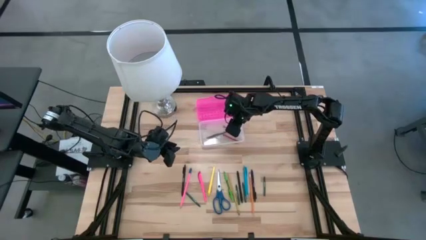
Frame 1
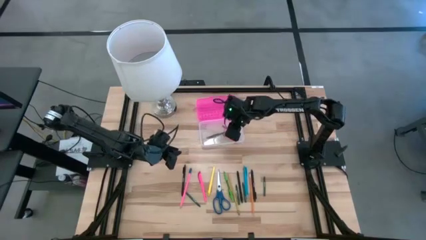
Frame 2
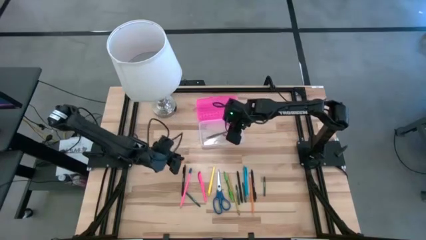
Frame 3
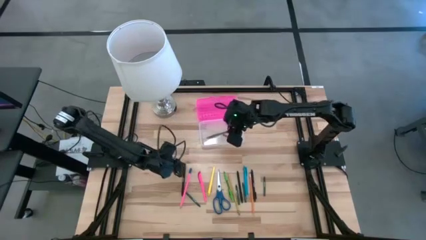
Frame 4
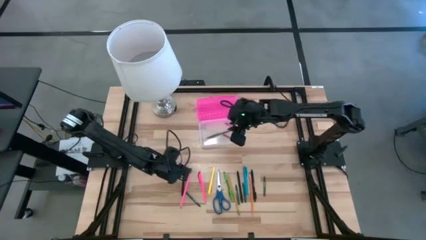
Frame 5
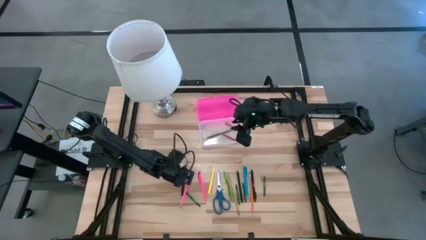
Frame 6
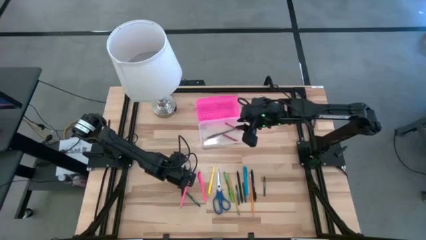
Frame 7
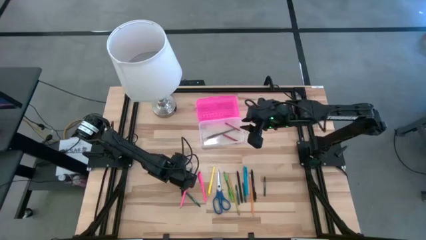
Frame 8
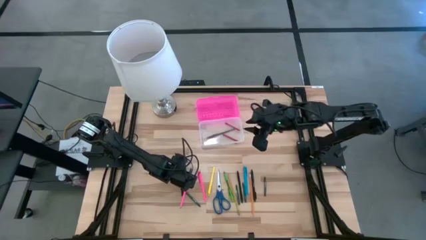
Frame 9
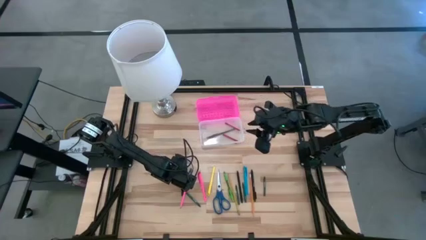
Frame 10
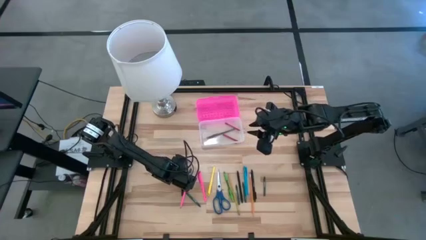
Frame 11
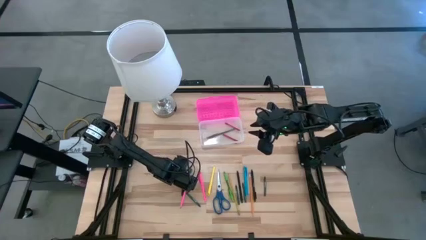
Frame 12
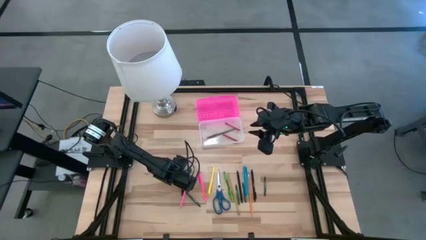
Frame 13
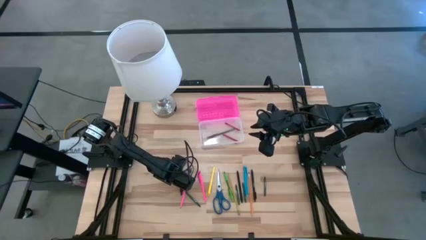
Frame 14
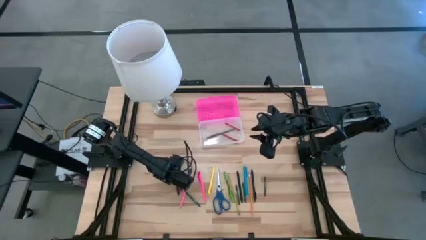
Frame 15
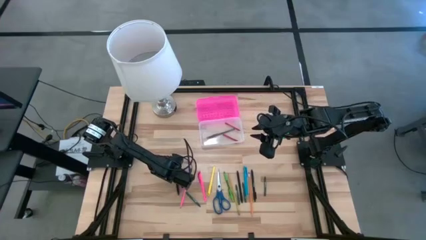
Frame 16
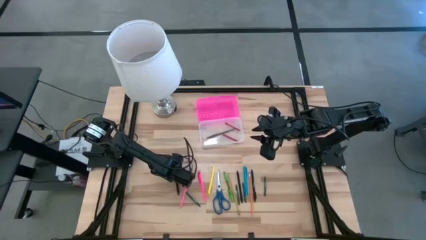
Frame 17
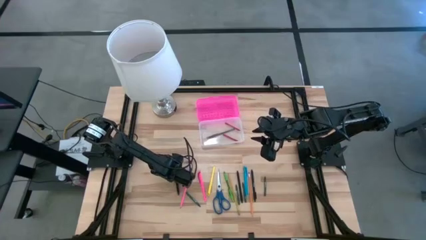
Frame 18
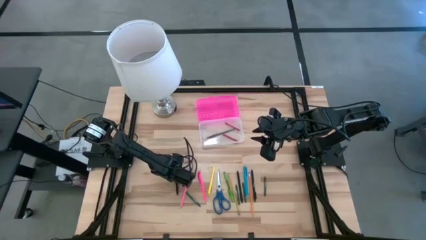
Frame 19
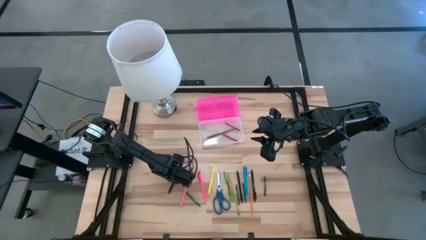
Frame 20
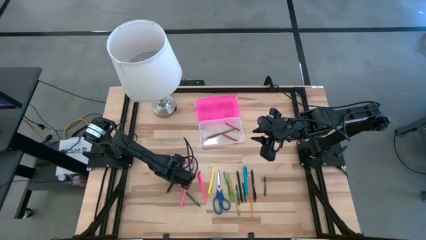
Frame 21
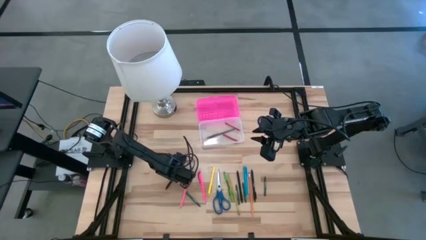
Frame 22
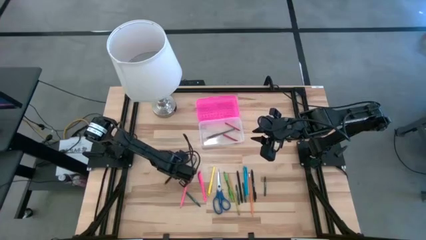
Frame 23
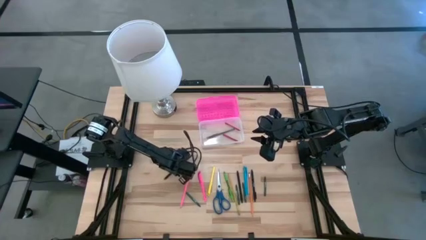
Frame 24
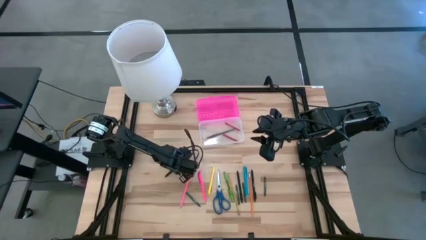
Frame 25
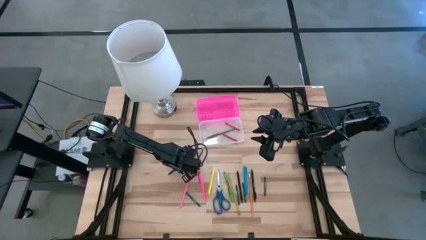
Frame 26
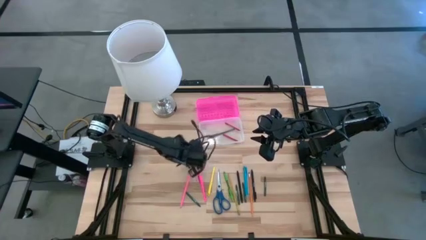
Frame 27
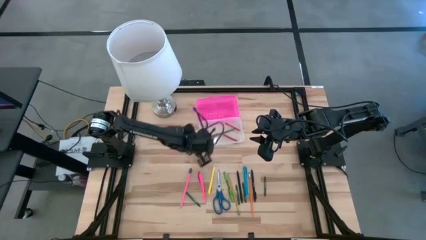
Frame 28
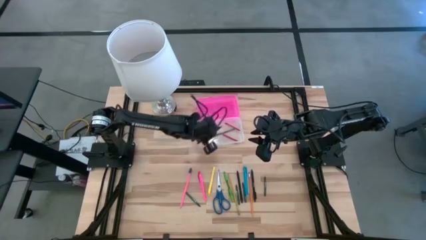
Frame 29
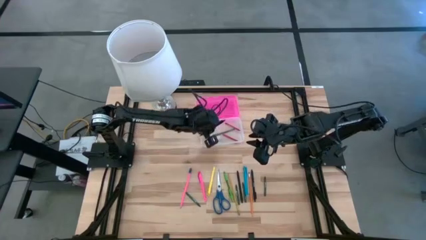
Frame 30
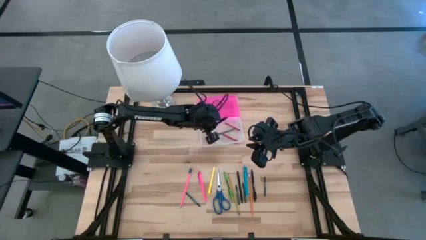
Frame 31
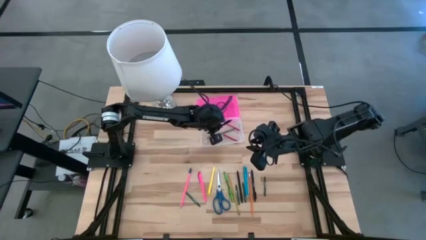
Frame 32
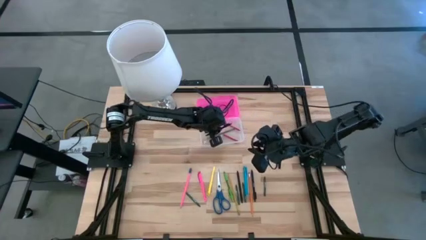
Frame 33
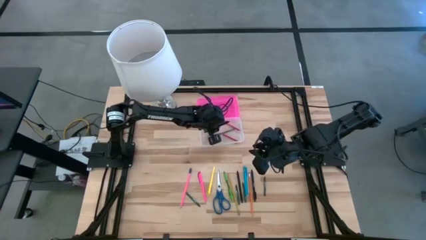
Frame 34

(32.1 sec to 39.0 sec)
Task: Pick & place school supplies into a supply box
Put the left black pen into the pink supply box

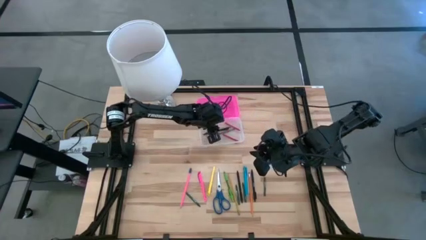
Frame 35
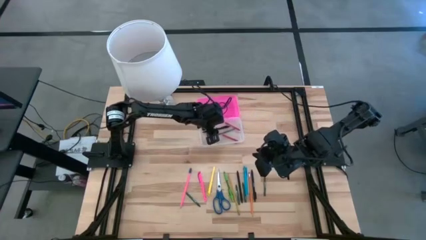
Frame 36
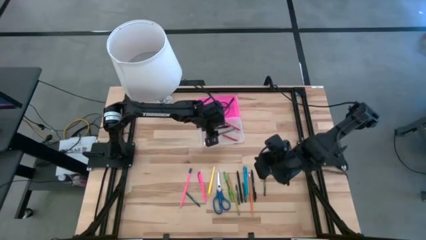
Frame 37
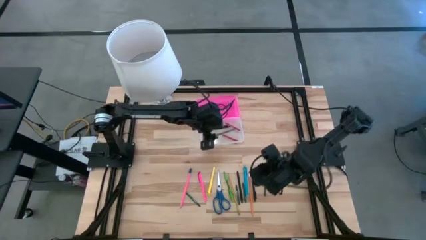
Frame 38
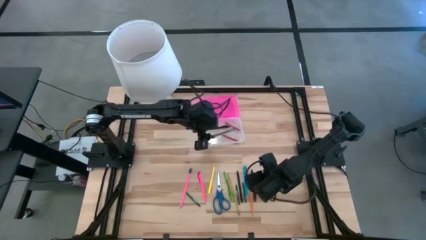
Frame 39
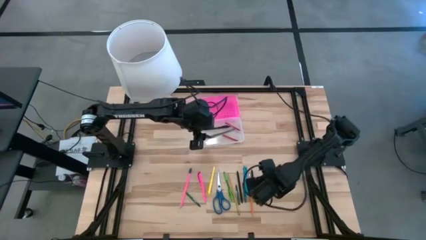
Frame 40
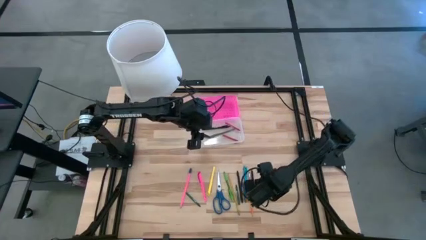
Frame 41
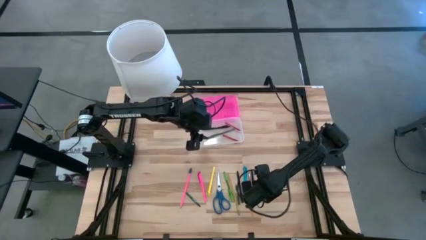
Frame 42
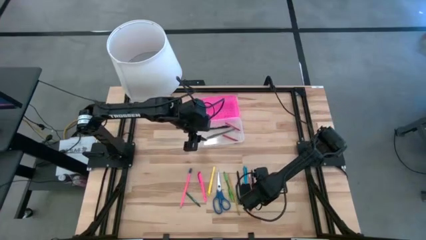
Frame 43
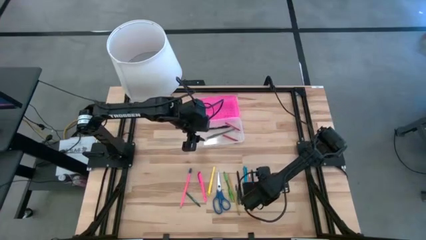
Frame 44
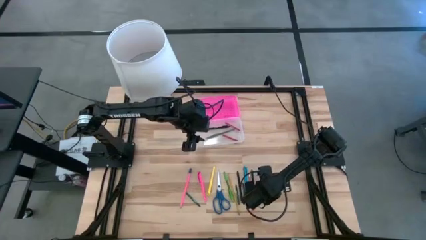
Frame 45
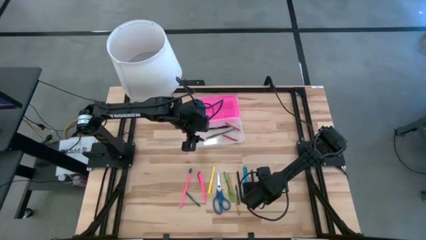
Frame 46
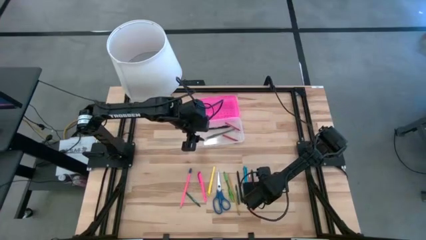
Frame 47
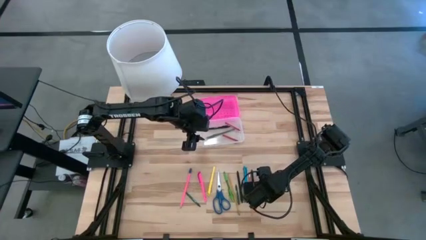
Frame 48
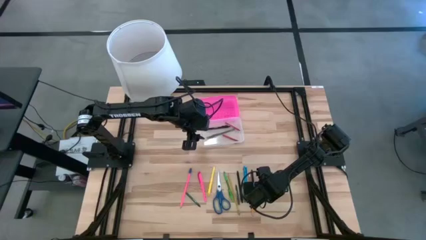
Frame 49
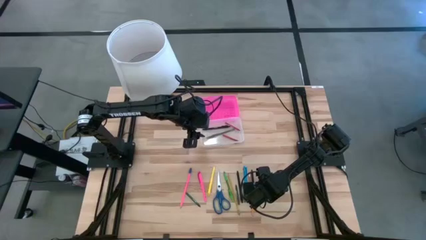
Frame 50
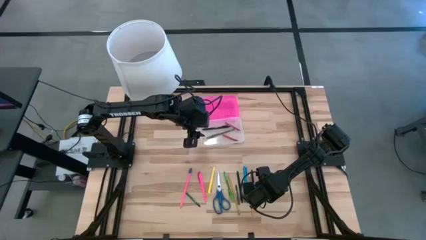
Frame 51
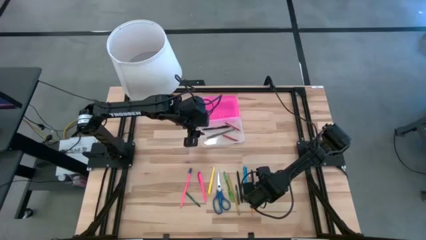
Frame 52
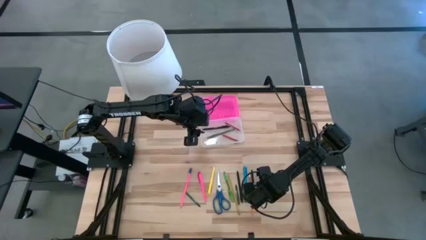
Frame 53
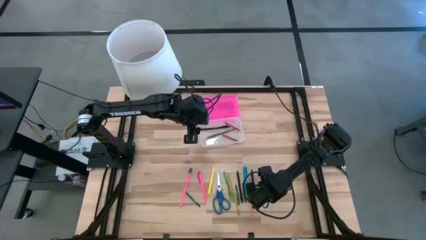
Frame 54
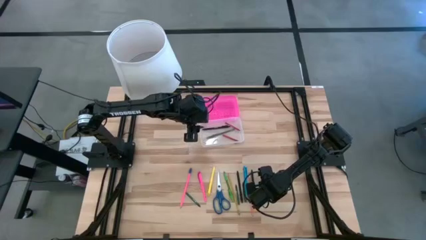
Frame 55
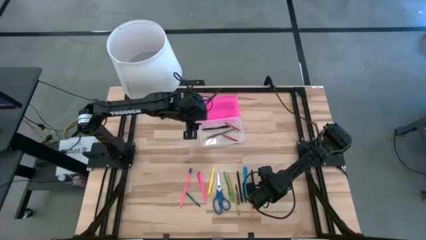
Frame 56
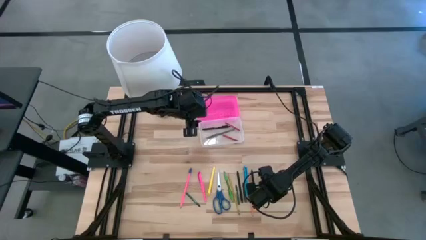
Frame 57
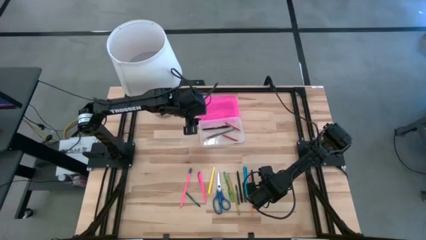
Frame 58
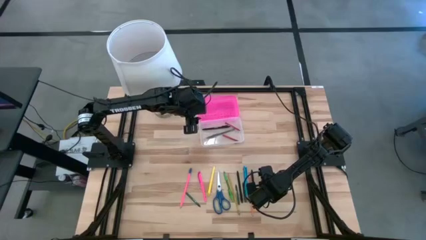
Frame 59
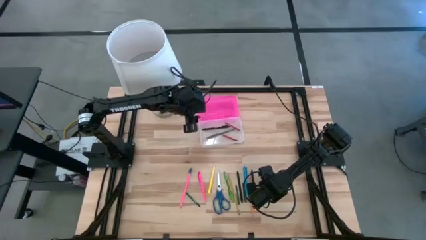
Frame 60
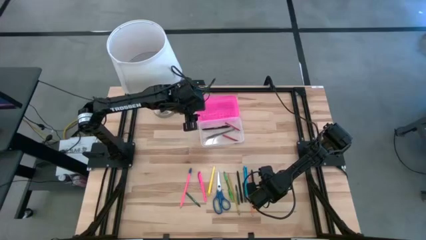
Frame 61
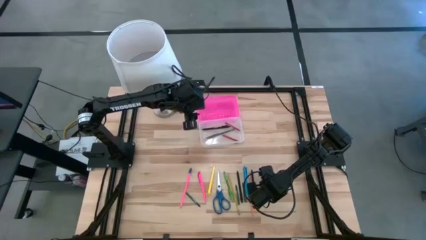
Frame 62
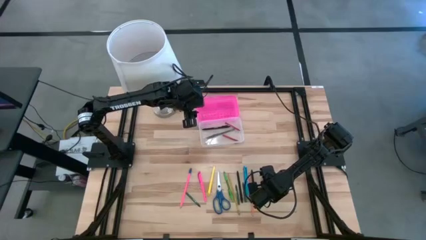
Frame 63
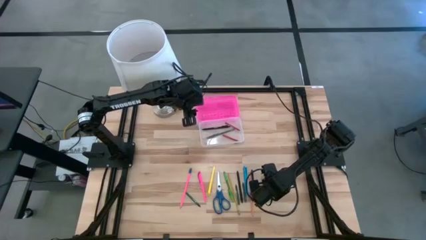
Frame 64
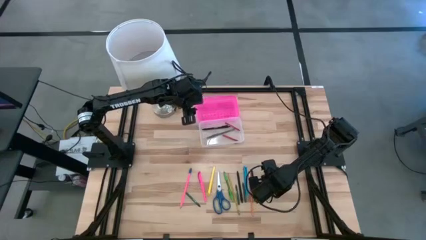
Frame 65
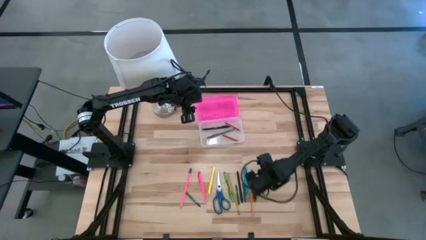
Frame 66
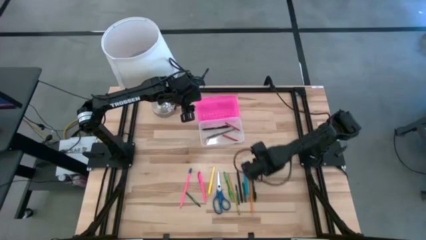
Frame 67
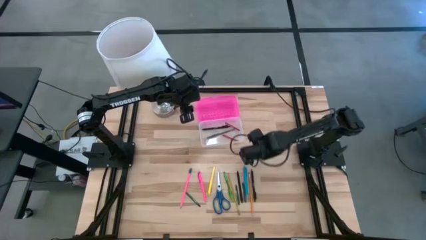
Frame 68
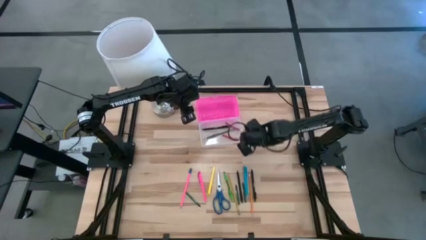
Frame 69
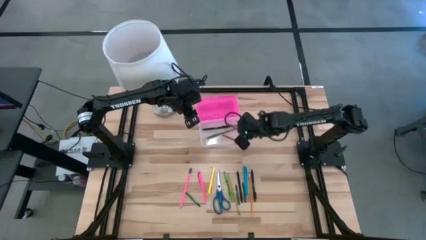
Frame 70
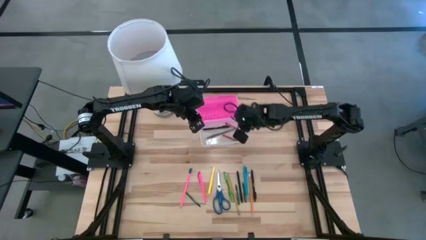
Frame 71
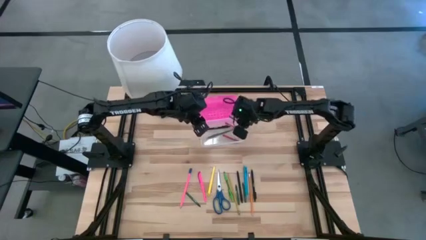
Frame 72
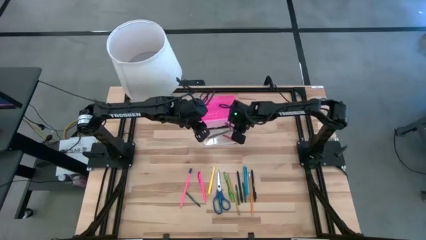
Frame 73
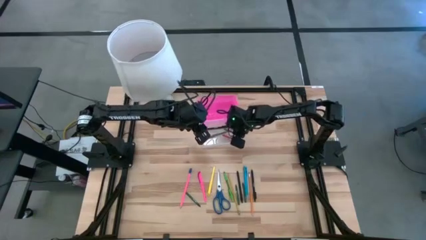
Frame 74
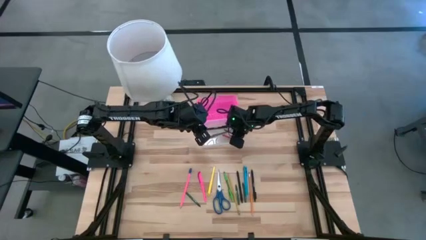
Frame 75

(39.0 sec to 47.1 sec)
Put the green crayon into the pink supply box
